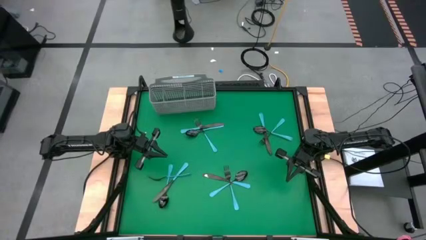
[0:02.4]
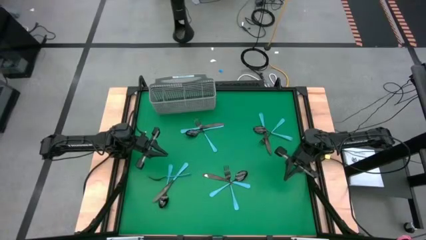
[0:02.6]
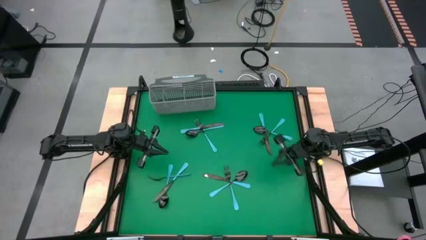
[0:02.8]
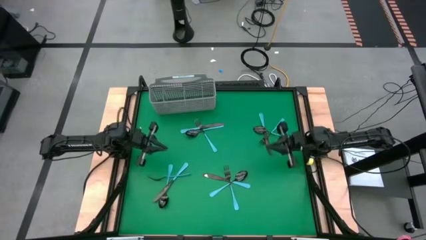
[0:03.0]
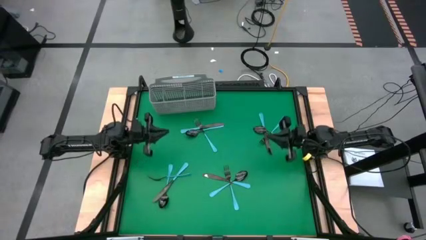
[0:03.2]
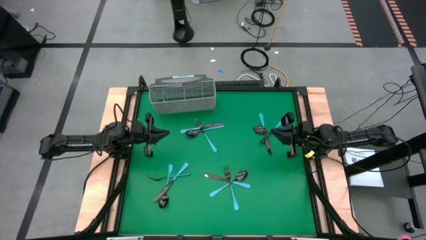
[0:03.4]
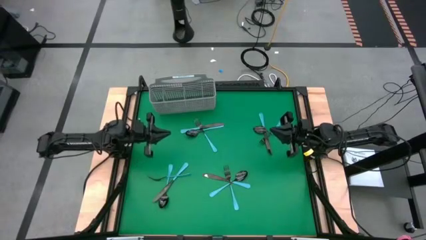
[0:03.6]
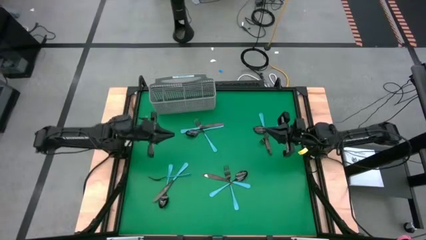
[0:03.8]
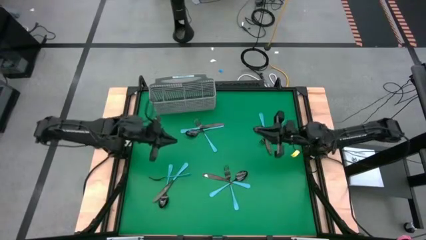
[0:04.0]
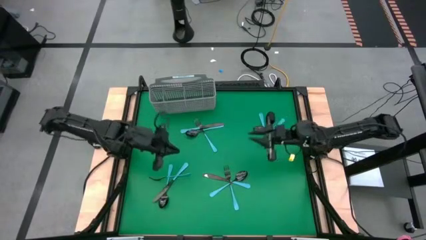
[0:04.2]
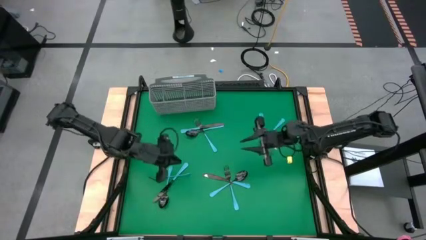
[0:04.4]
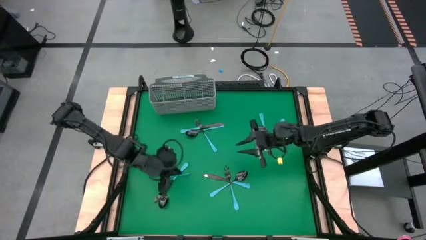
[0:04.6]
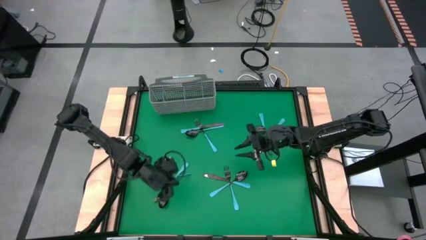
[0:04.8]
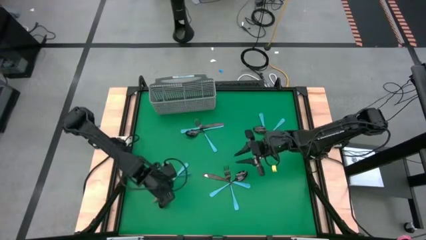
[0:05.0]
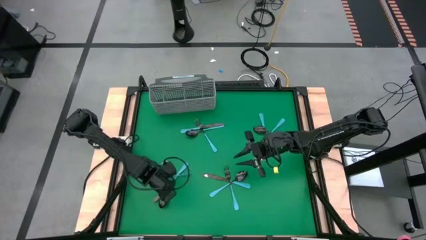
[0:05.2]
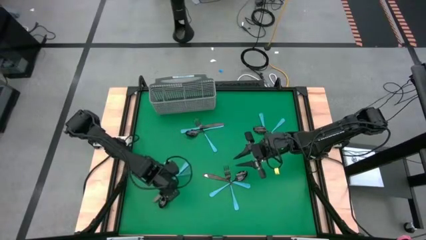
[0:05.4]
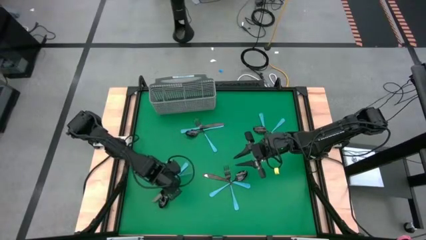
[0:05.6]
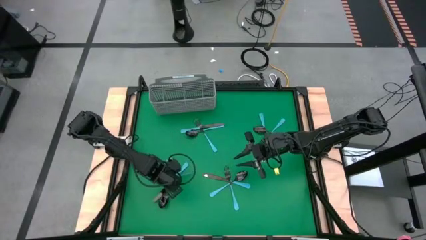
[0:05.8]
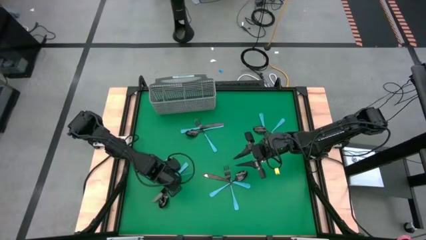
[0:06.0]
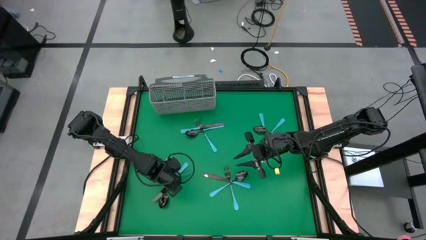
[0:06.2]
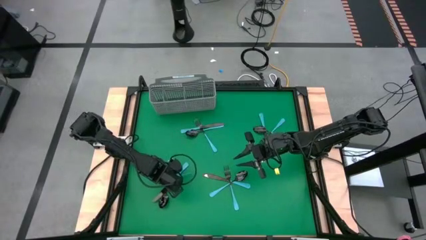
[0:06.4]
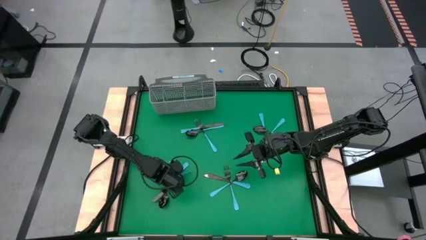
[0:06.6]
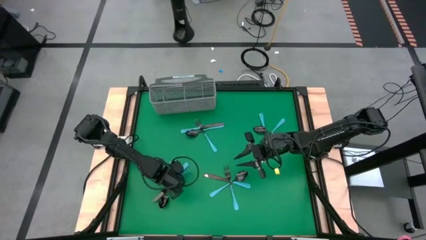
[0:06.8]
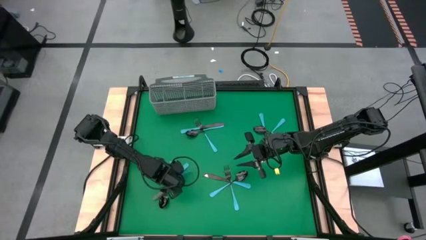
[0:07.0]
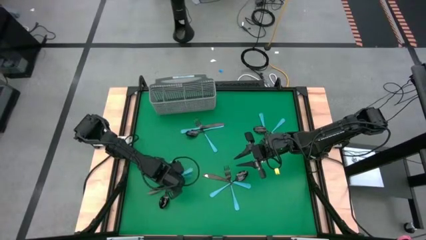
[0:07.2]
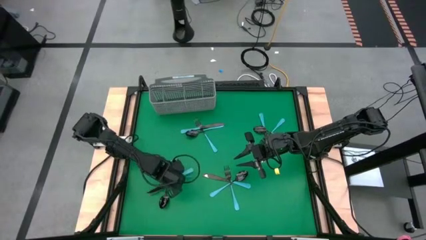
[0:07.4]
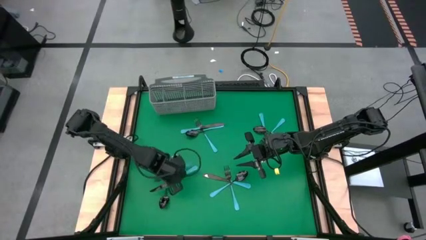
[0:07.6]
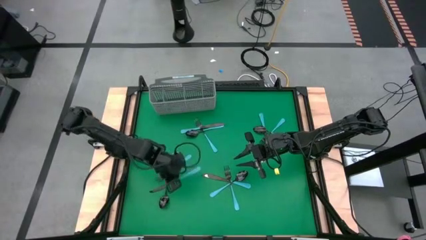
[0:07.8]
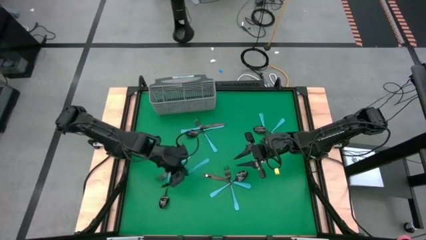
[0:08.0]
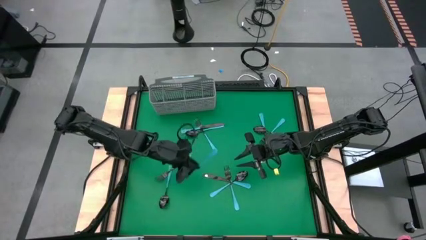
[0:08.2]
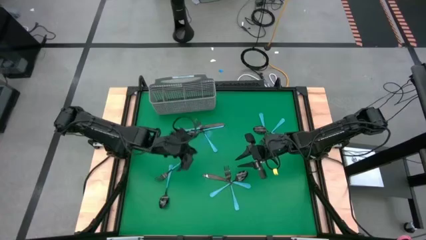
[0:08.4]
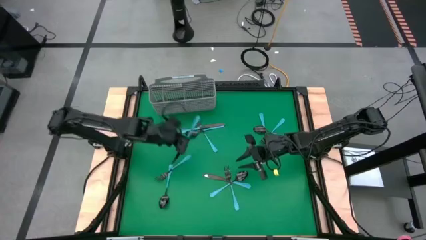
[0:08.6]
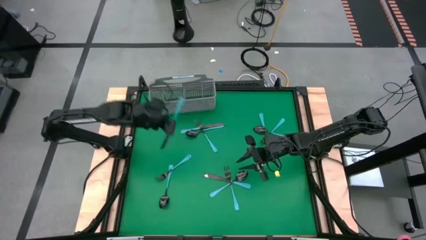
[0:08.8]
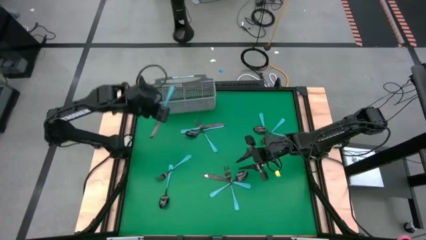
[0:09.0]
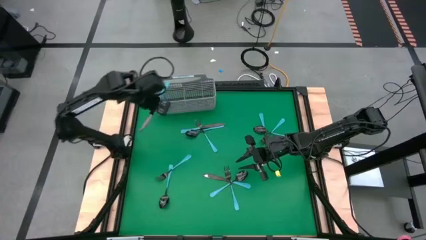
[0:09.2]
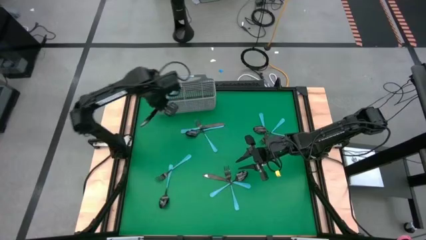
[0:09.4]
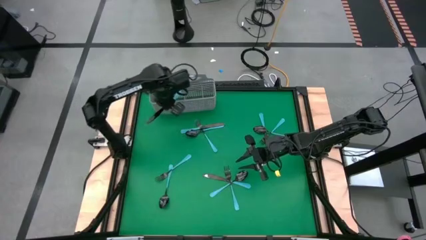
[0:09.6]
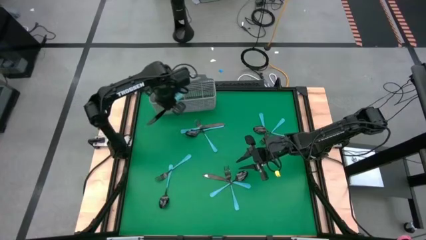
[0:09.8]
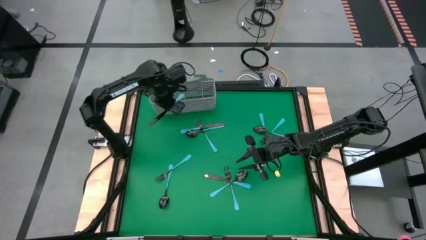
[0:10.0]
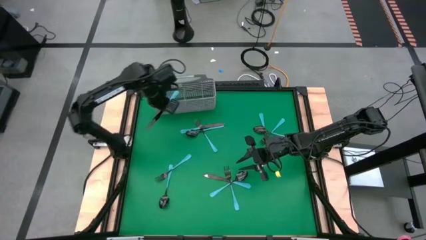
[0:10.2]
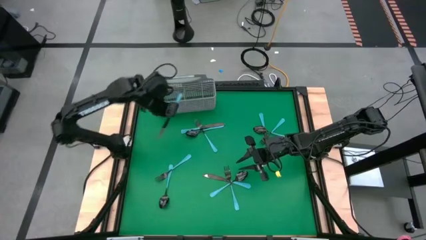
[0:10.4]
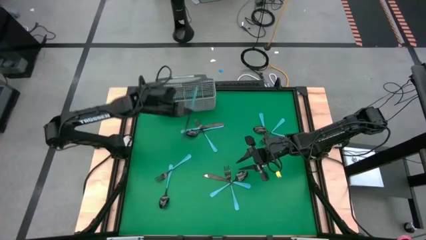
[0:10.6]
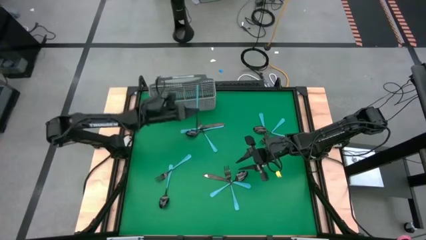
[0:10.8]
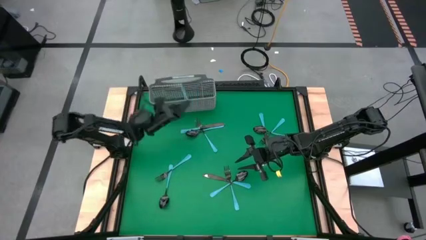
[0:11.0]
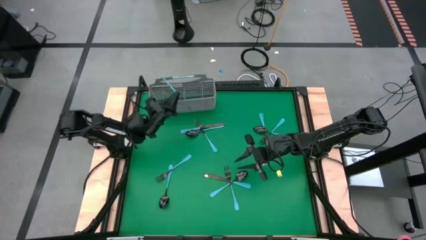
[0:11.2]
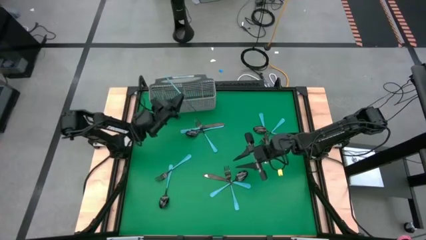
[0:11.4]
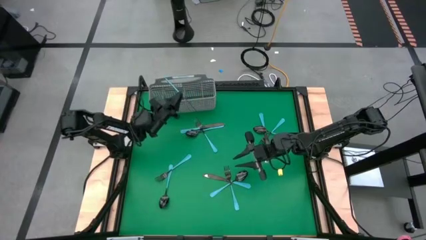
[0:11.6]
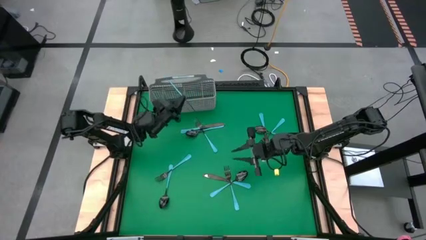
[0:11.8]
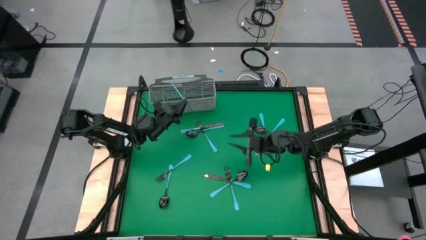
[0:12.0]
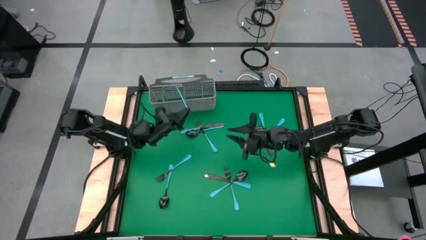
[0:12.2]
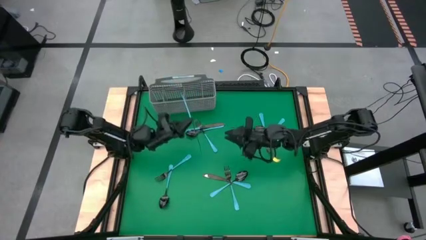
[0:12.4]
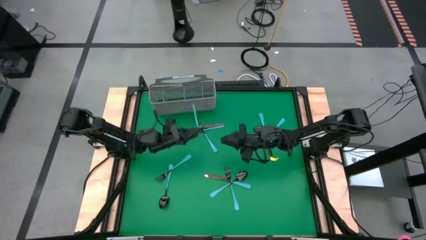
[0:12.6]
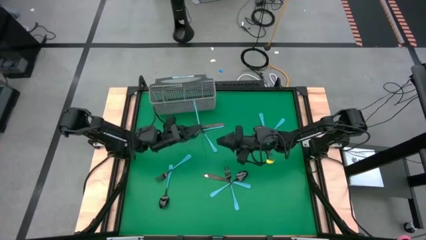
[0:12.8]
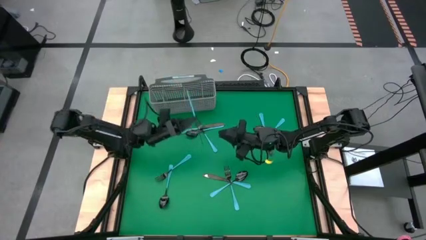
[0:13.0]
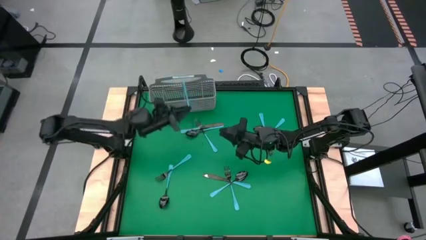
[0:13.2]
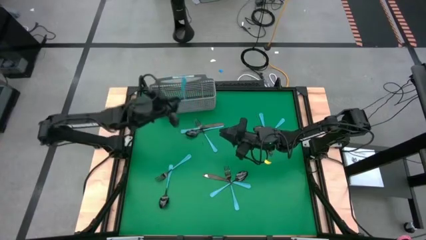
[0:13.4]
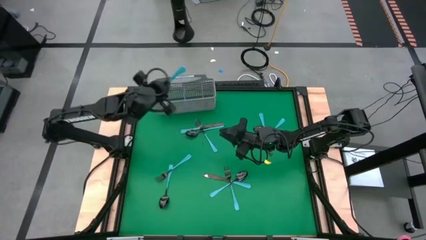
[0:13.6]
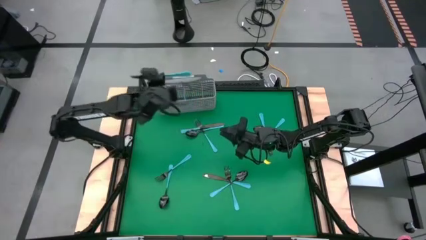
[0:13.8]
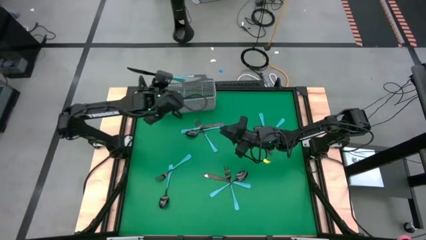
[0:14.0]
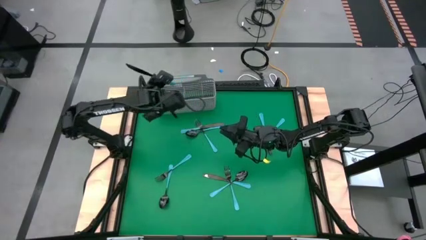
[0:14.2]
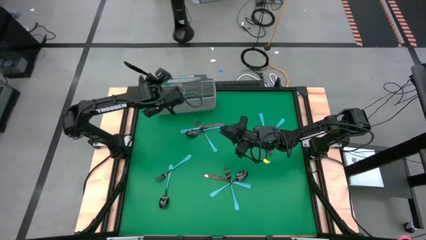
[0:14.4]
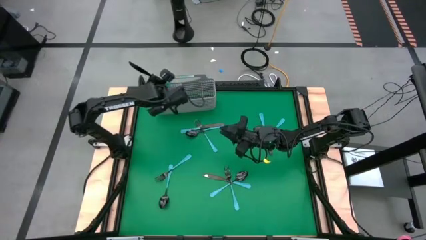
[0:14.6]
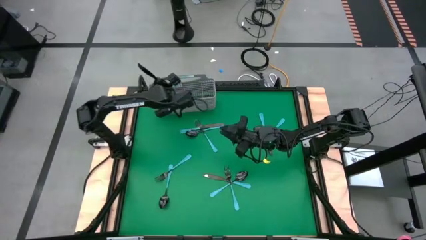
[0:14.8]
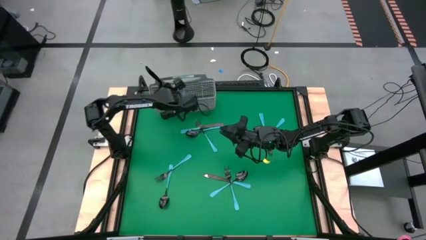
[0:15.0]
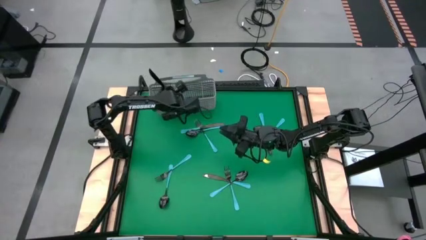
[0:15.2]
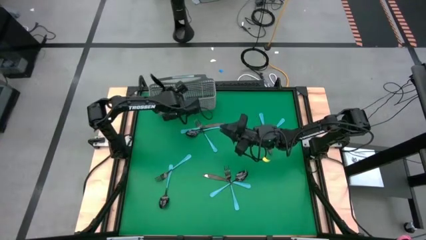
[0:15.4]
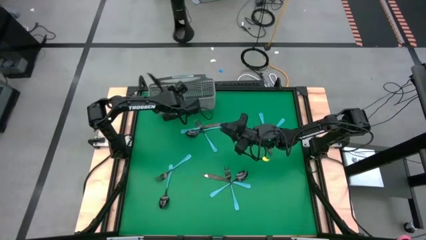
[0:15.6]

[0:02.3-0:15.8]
Task: Sort silverware
Put the the table knife into silverware rack
